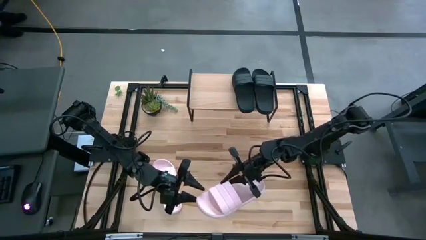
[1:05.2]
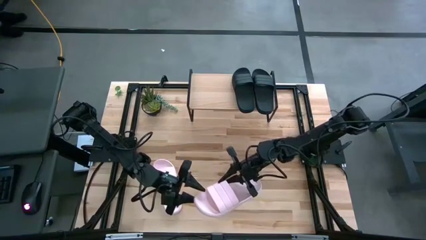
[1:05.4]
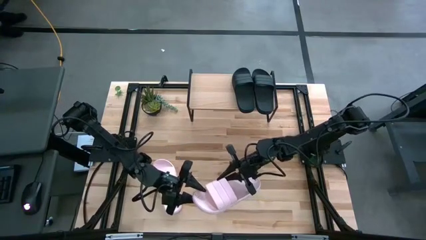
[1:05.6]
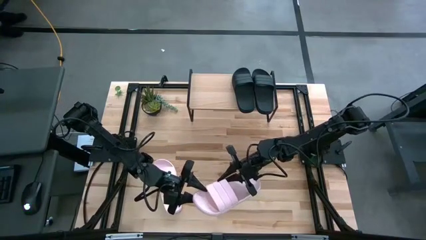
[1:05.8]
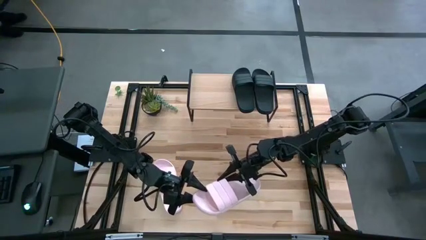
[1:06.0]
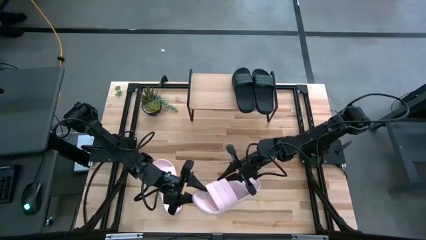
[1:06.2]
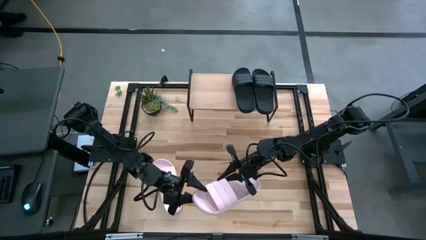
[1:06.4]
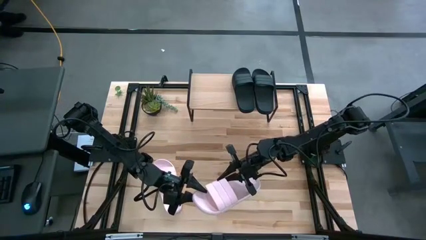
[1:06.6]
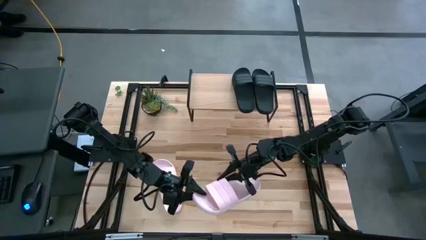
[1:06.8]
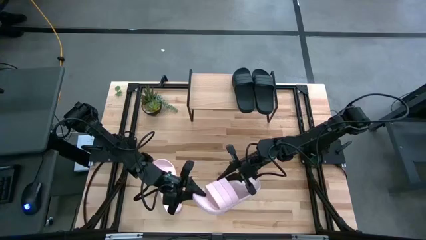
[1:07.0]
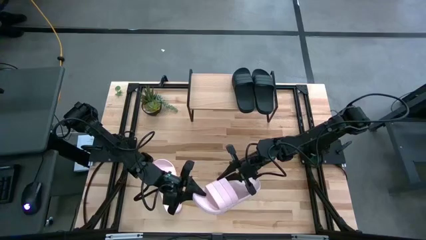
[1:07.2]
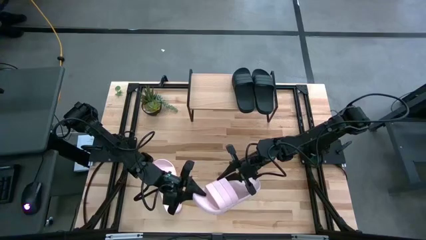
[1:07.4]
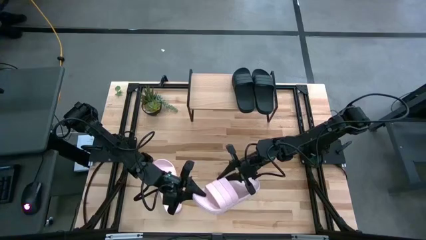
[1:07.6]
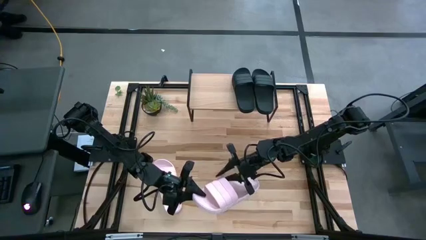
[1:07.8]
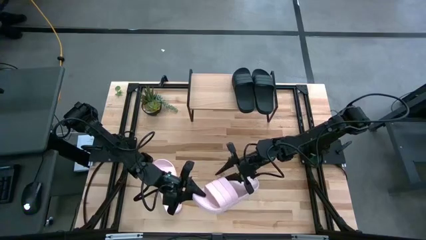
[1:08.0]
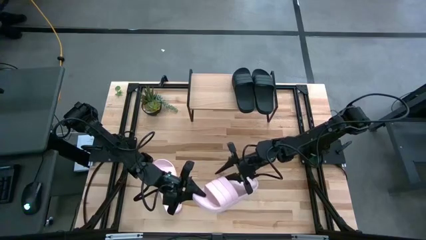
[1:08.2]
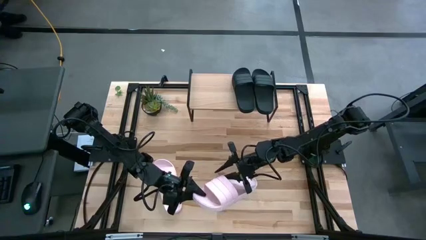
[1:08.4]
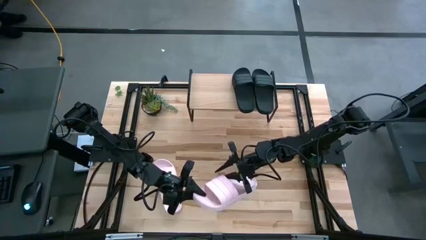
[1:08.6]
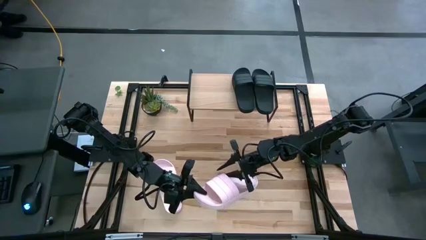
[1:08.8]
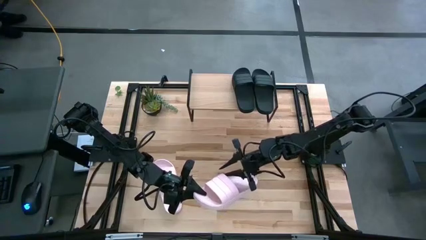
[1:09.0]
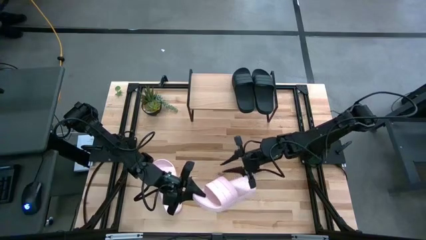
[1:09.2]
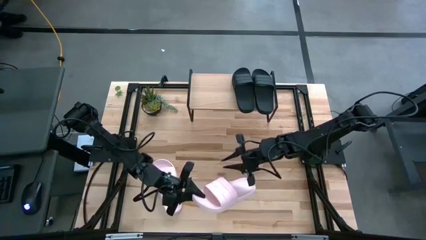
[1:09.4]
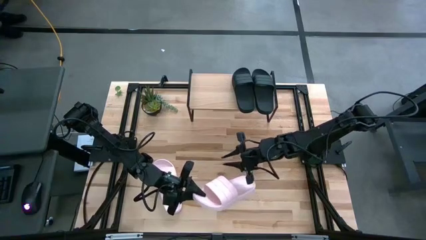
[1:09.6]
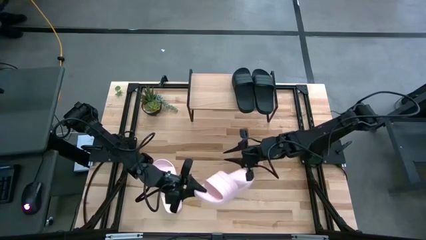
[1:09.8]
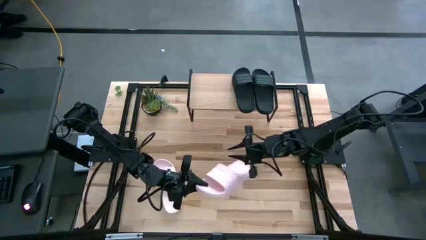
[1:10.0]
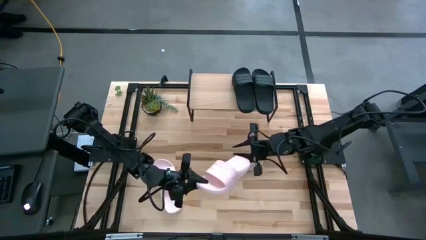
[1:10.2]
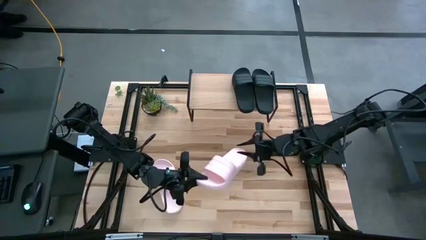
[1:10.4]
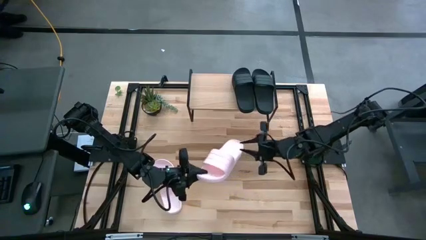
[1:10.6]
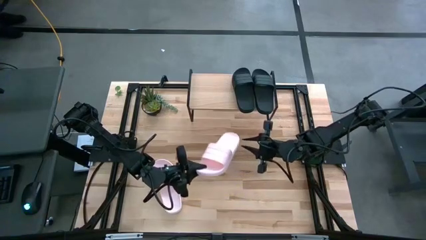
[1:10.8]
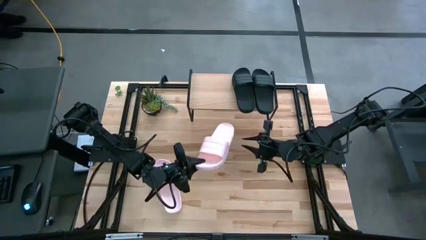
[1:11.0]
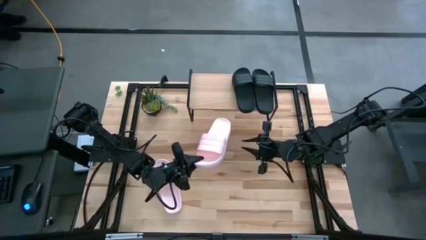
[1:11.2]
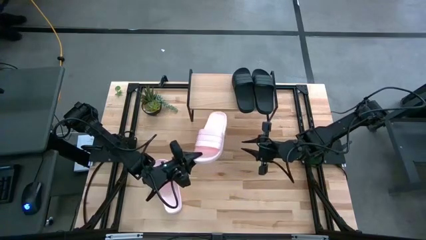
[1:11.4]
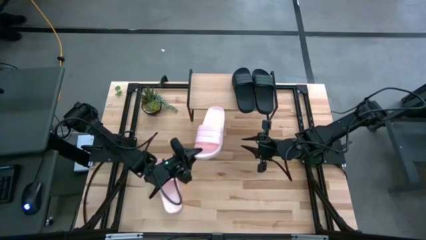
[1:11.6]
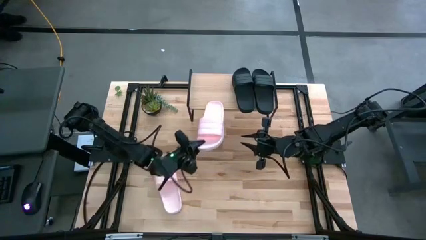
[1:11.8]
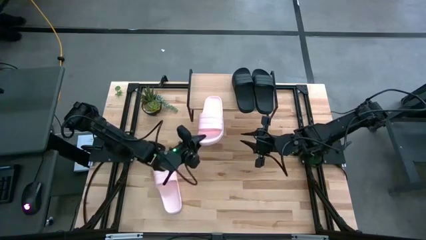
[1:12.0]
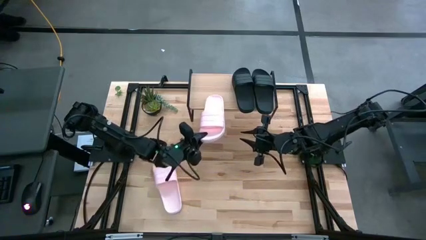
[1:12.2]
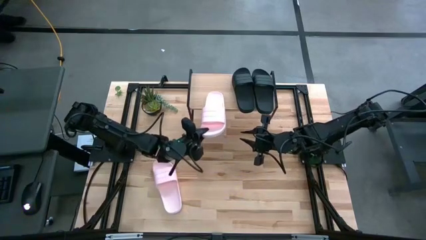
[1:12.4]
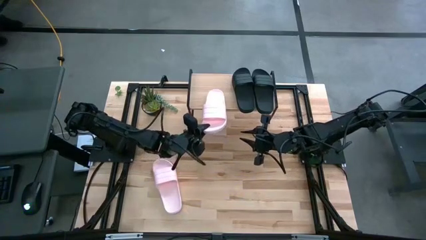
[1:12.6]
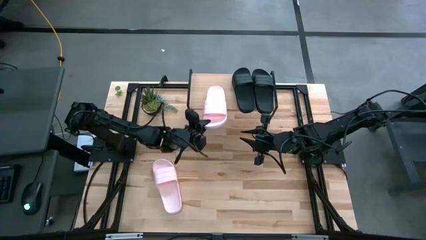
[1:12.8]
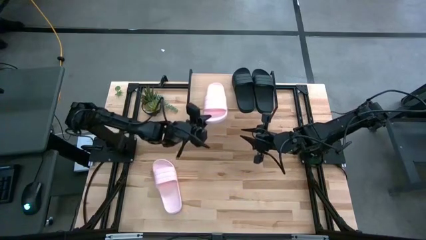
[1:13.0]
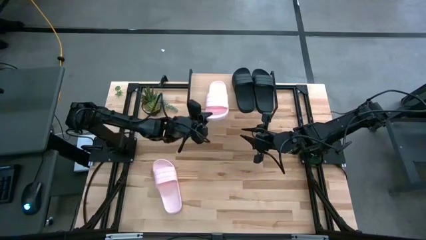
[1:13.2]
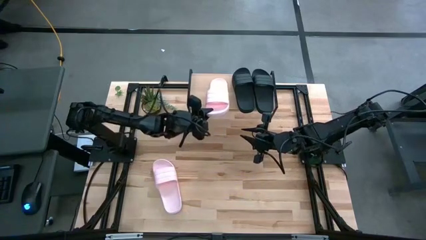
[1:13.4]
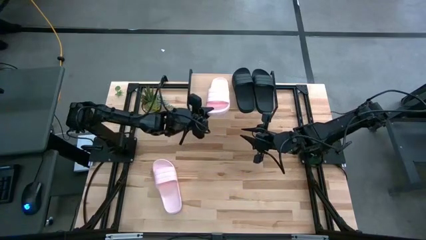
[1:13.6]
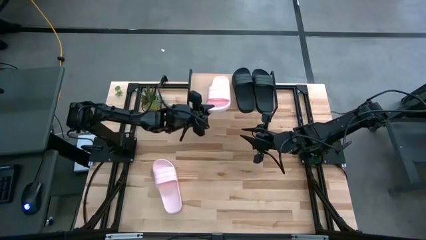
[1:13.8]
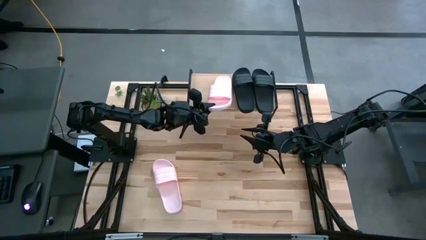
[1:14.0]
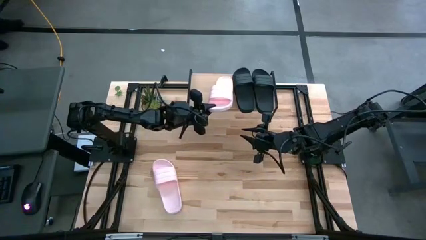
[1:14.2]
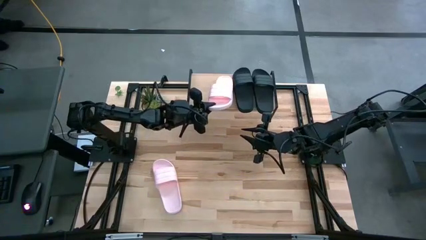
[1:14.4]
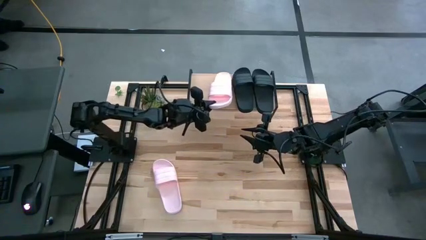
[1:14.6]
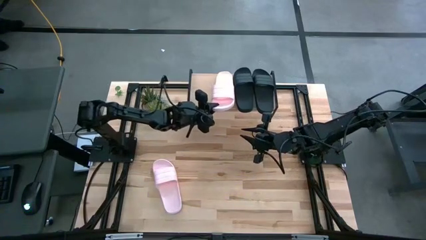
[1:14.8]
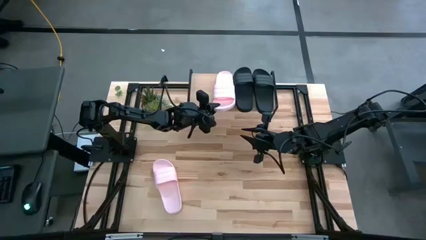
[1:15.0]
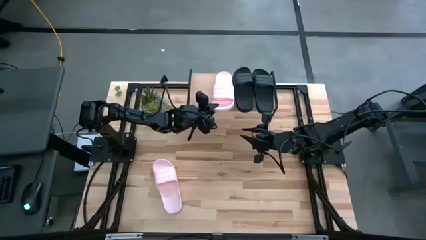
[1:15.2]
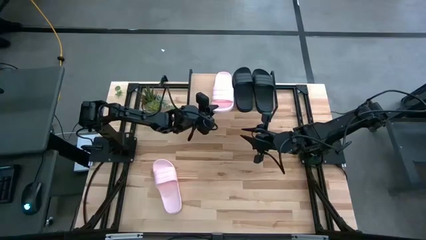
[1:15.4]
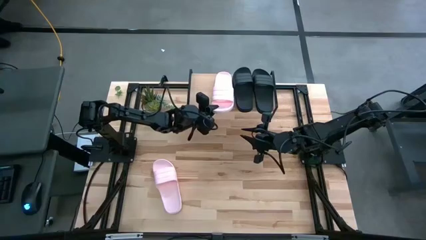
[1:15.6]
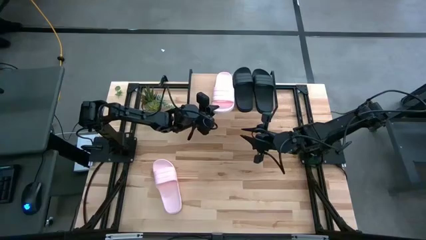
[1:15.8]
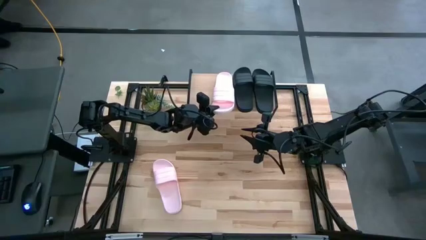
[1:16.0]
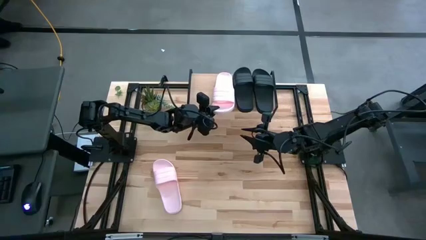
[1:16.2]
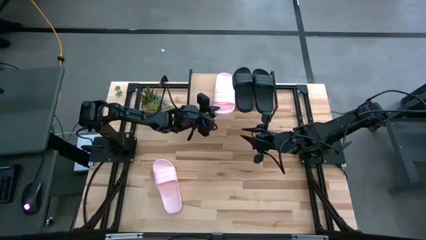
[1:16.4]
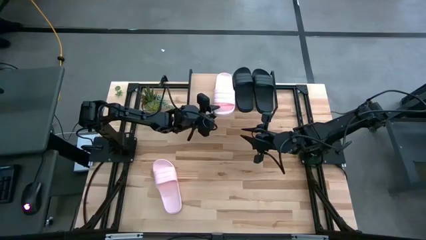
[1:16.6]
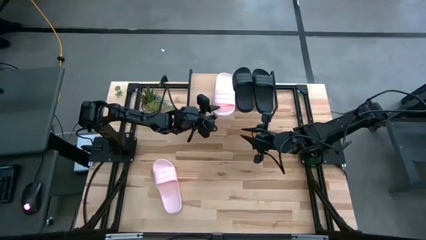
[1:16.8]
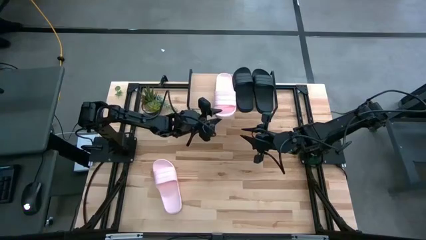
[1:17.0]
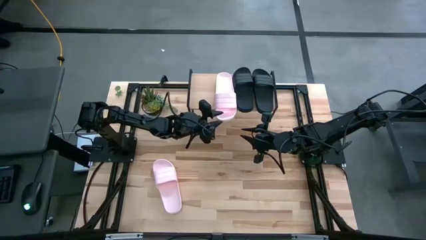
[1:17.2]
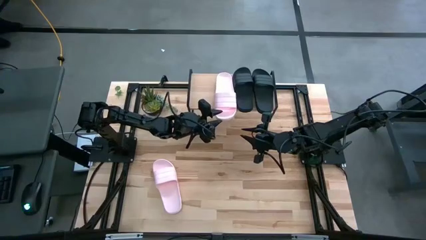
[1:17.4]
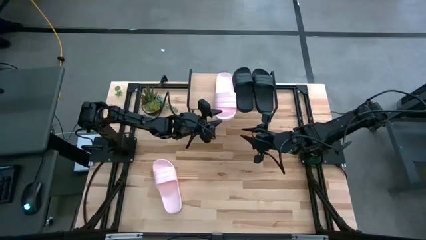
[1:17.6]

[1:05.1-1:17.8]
Task: Pick and place slides into the shelf
Put the right pink slipper on the shelf

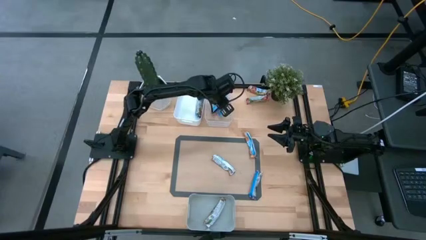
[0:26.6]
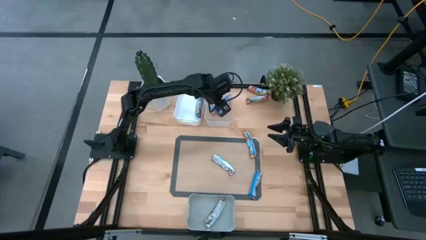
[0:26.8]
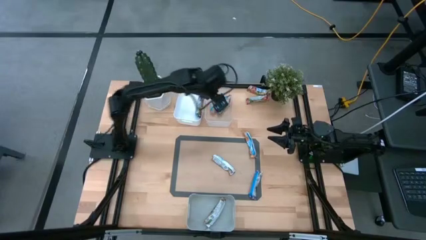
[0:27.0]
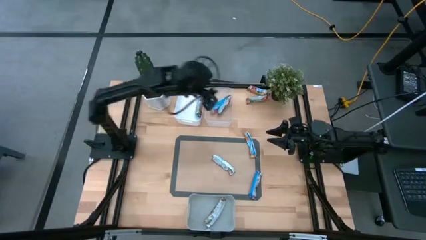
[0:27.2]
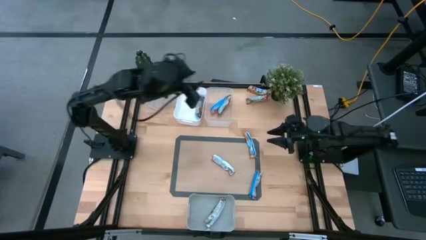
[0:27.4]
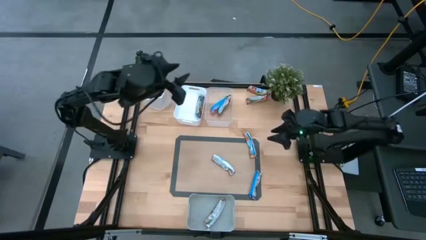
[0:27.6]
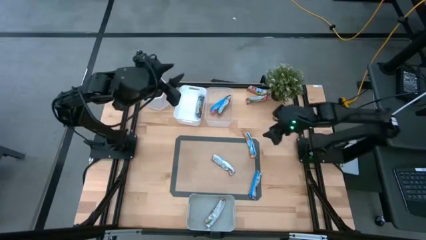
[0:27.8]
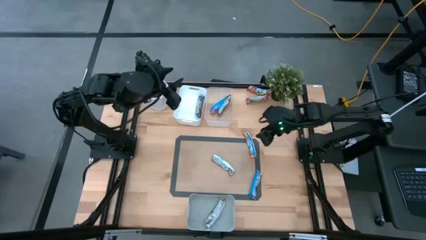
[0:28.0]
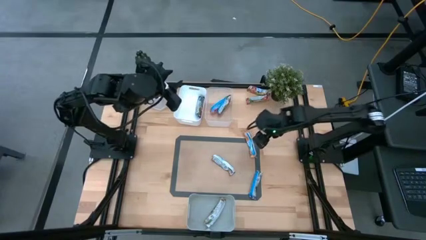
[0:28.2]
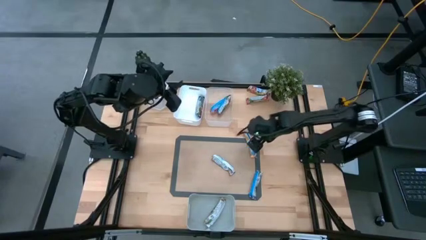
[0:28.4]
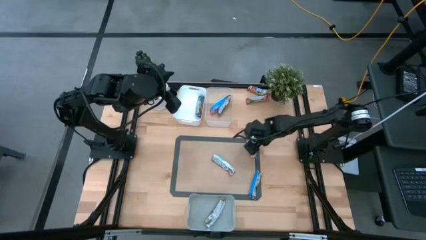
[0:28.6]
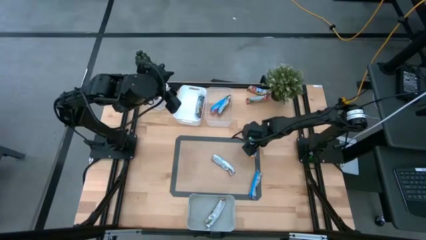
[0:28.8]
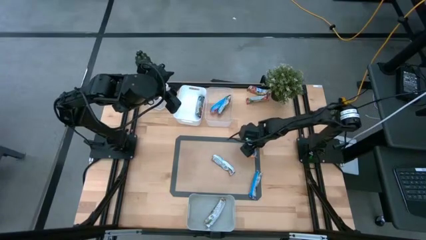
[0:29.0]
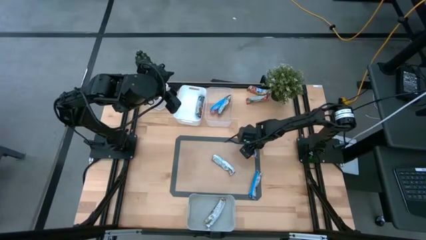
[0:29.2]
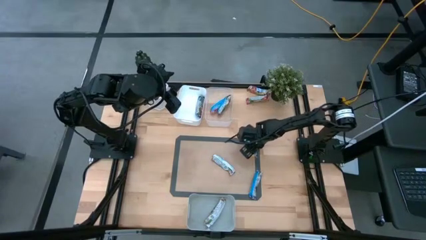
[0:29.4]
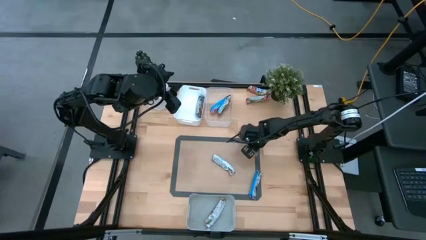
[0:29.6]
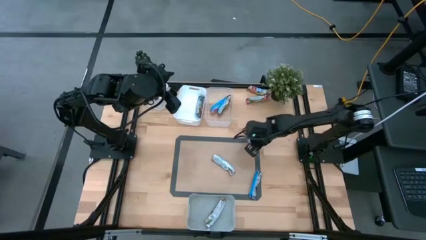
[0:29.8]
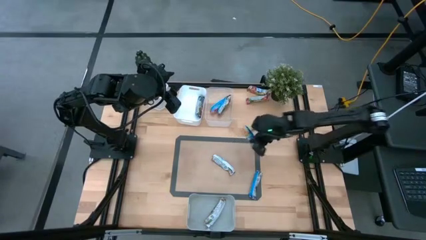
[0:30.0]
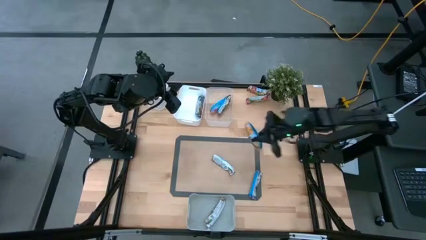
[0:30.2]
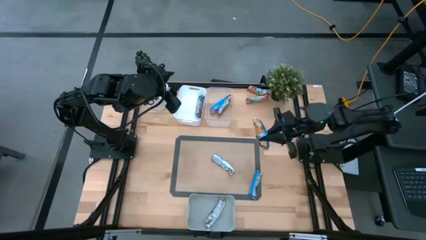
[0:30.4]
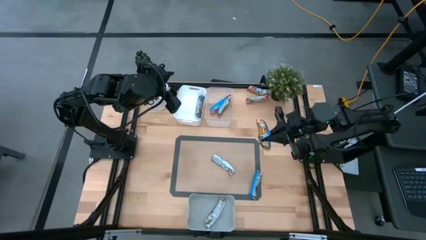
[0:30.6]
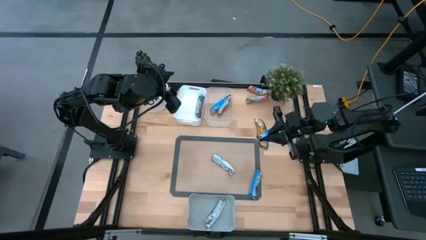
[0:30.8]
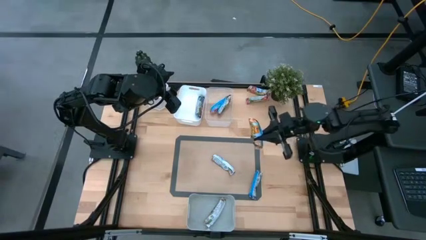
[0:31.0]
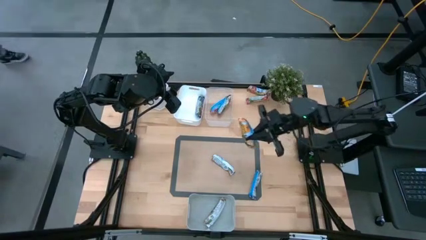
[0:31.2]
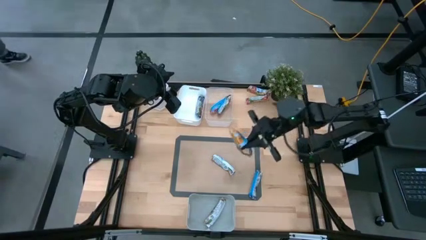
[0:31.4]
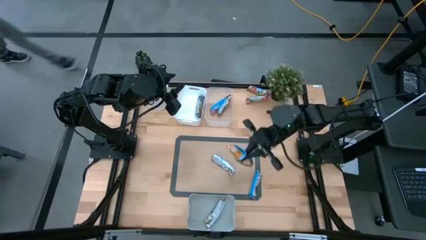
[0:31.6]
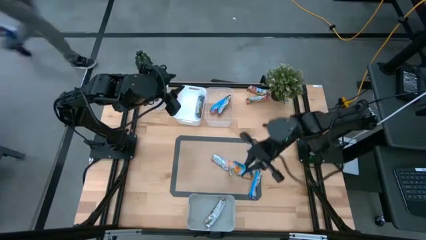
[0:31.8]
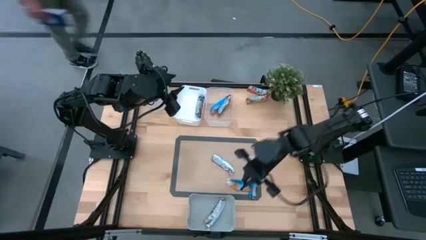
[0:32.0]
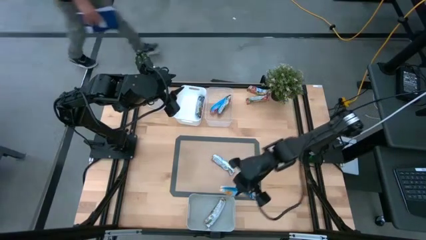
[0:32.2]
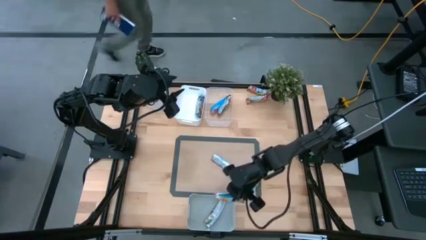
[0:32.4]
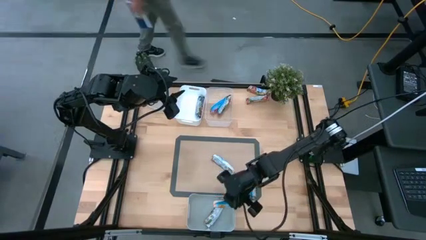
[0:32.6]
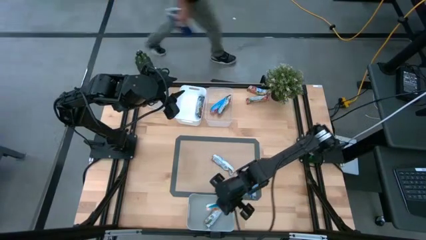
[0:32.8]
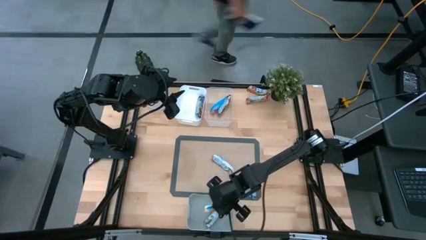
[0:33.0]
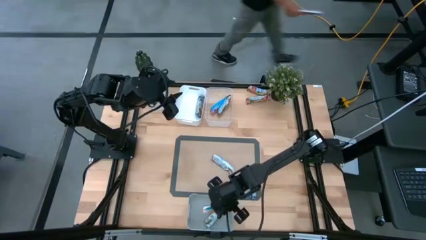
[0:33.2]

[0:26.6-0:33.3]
Task: Pick and place Granola Bars by type
Put the top yellow granola bar into the gray bin
